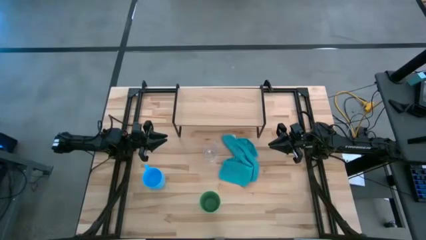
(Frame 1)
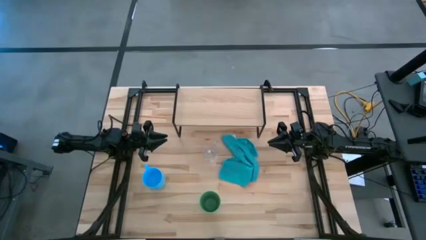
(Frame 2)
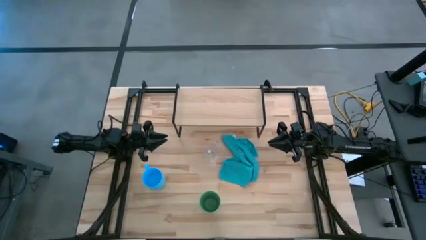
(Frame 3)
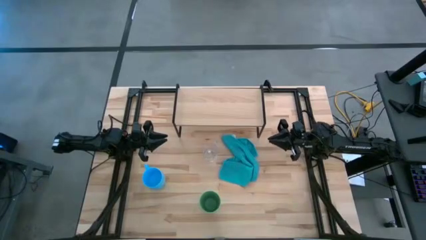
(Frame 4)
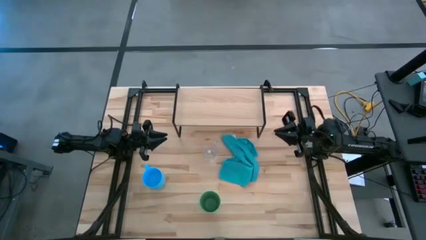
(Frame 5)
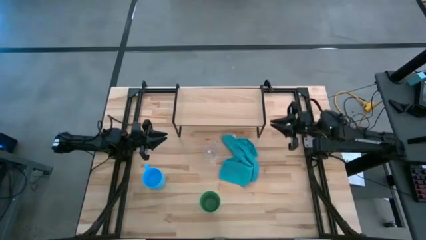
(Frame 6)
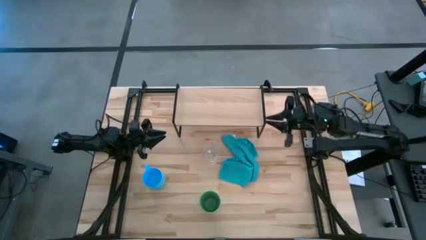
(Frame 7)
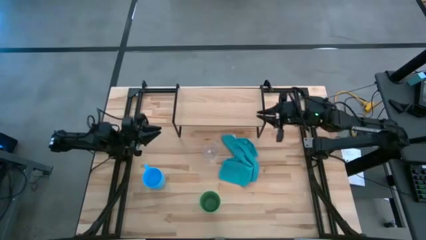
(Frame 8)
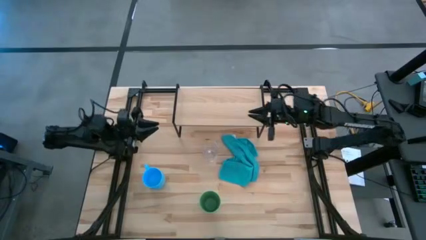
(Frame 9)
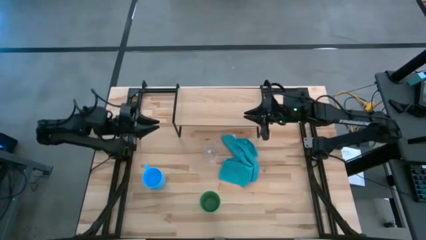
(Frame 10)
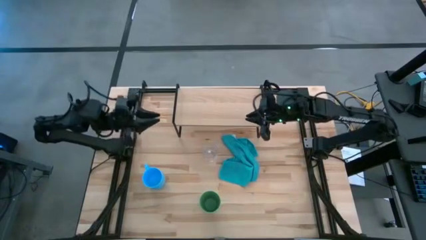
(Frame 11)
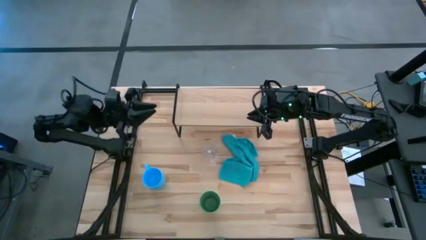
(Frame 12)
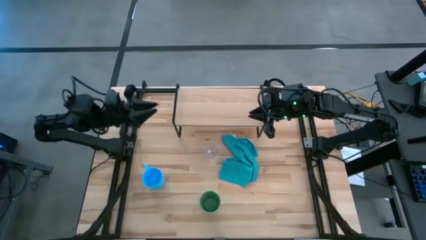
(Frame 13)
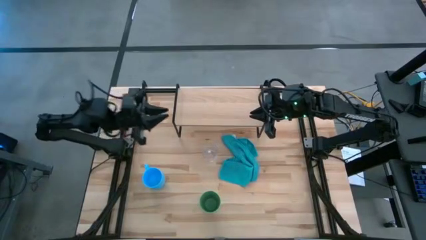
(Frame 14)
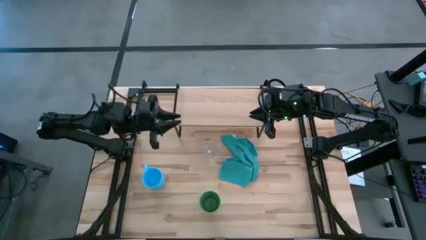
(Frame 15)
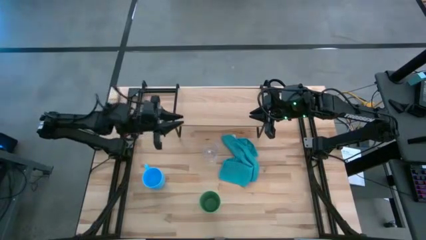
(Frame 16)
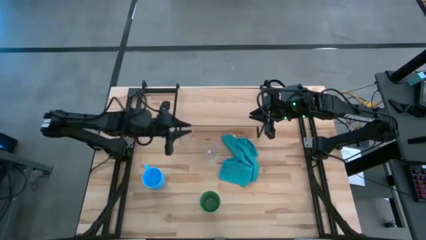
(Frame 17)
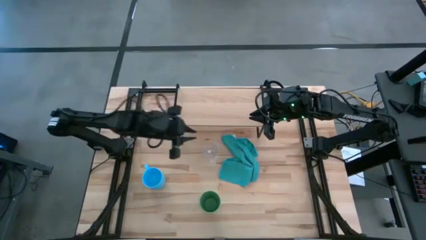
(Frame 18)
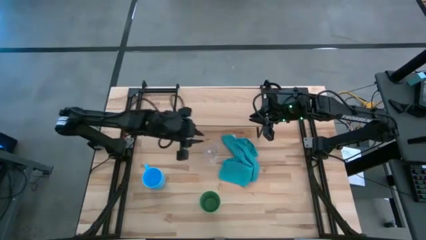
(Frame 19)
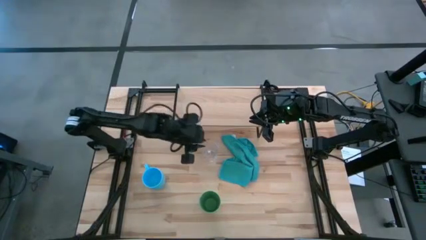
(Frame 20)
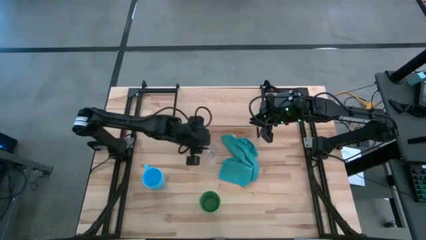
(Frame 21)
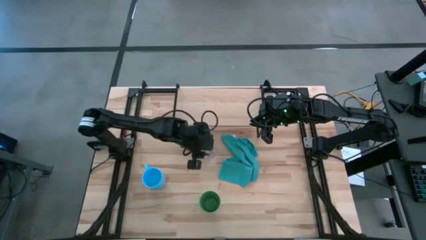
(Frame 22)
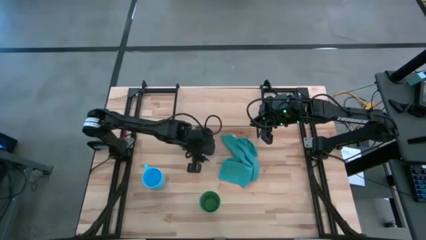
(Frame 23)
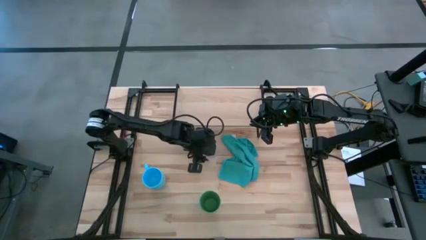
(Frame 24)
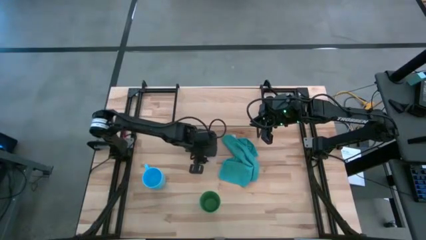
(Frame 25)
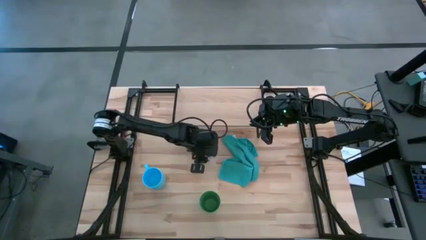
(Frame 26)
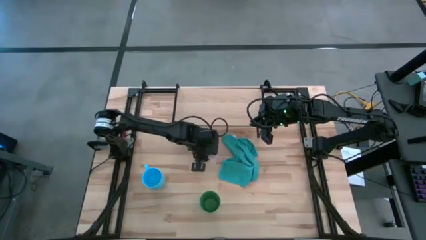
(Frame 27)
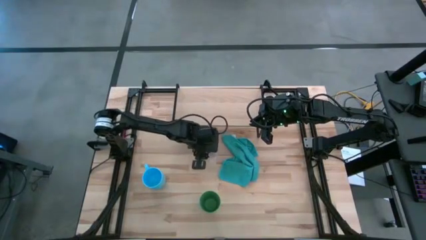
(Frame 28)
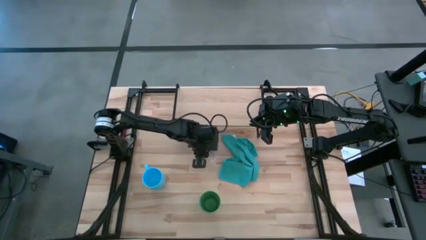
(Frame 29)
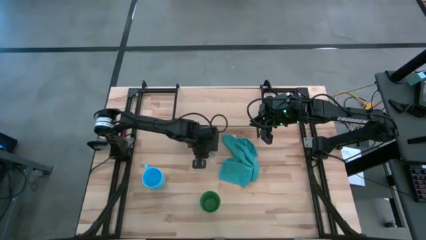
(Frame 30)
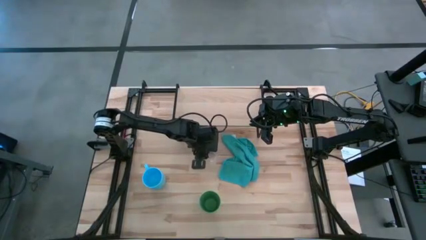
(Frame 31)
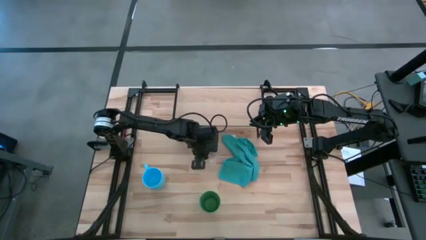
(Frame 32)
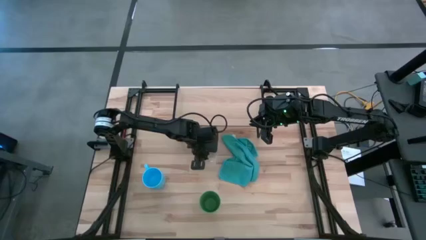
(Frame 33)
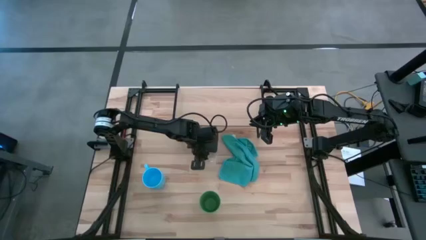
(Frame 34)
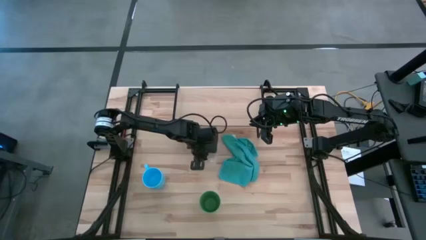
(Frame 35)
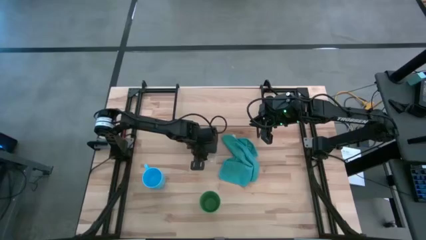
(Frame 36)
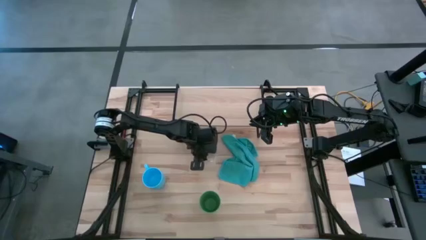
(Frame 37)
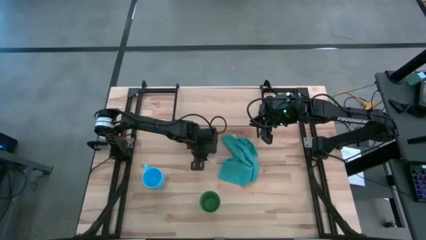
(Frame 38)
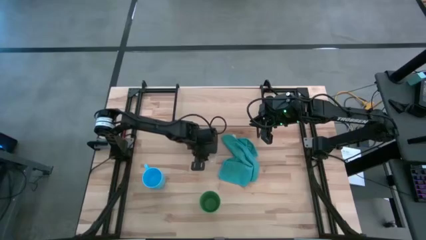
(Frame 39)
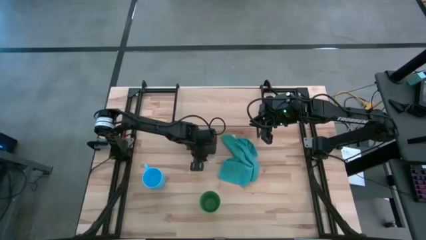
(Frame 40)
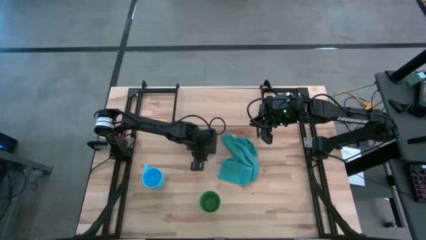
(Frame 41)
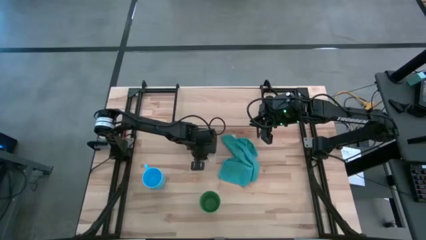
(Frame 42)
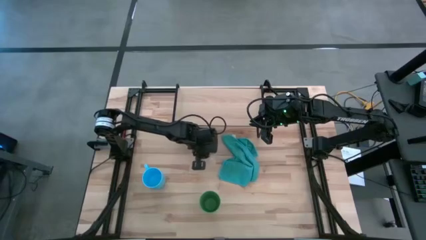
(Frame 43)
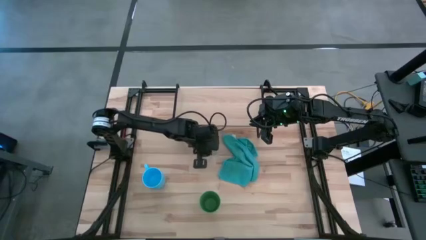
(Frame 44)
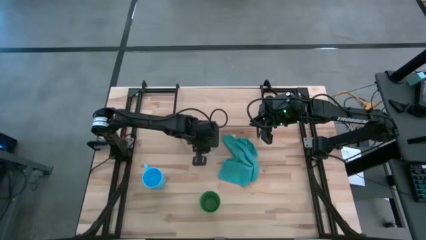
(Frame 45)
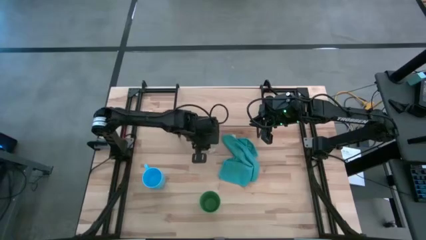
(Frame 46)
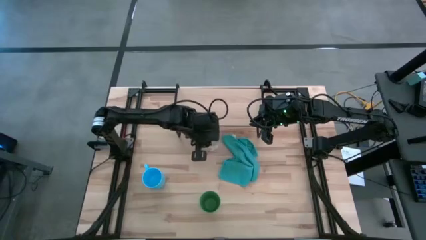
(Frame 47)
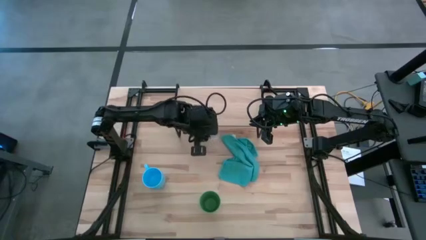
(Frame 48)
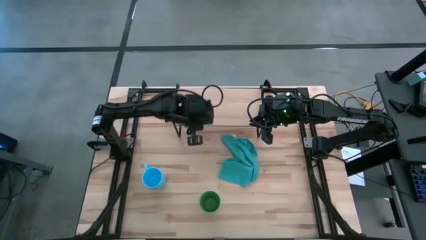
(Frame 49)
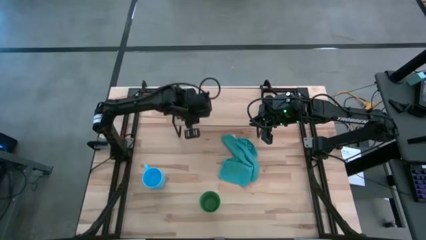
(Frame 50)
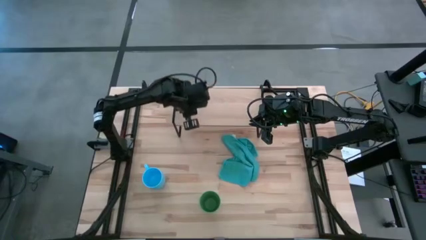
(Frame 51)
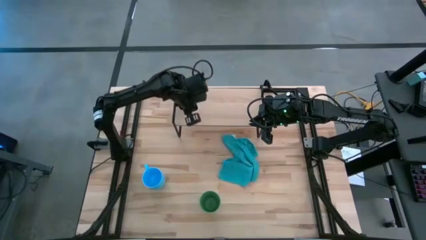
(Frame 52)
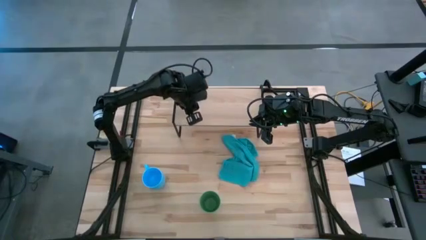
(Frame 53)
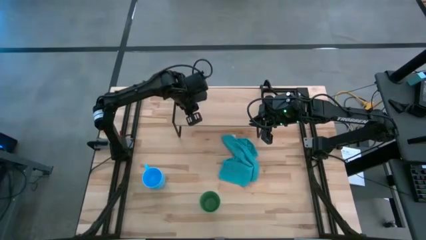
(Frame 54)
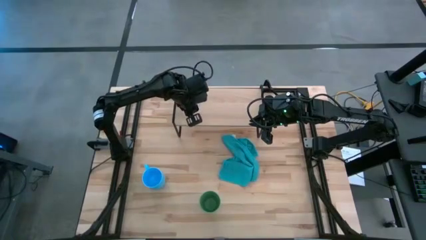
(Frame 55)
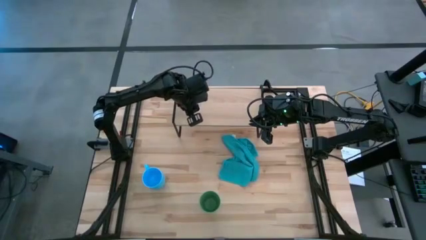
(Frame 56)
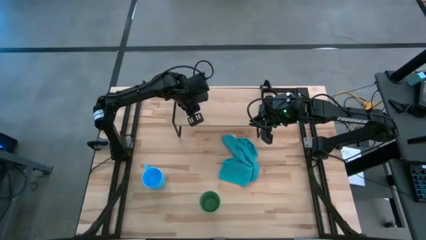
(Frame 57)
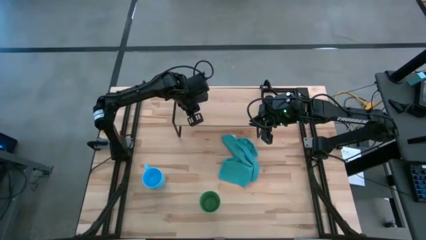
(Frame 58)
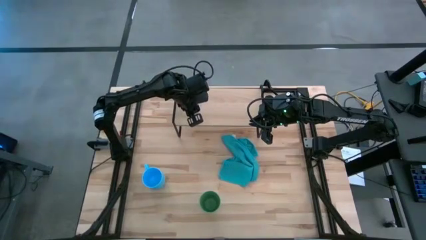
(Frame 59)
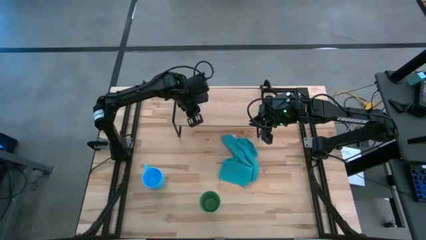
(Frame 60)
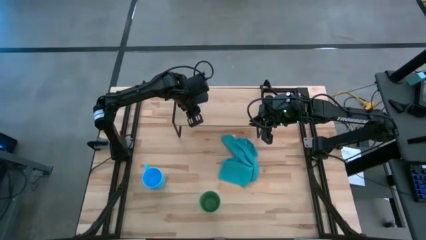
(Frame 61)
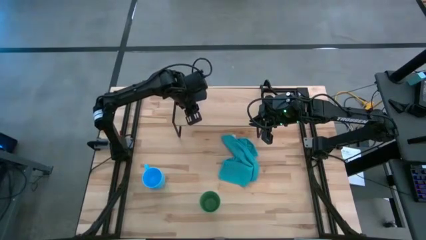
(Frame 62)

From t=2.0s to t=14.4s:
Task: Stack small to large cups/mugs on shelf
Put the transparent mug on the shelf
